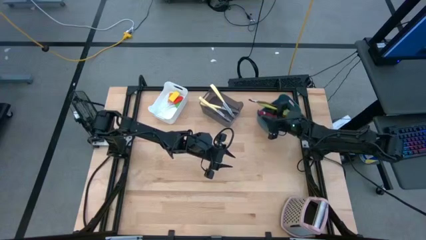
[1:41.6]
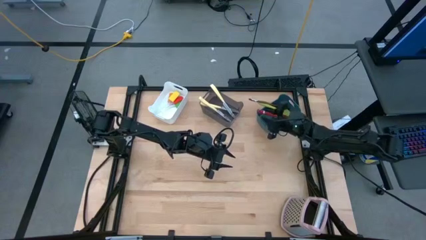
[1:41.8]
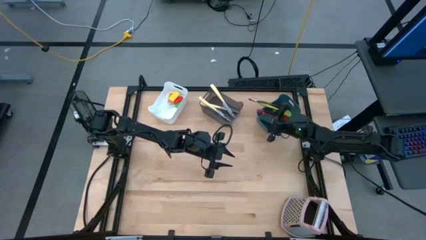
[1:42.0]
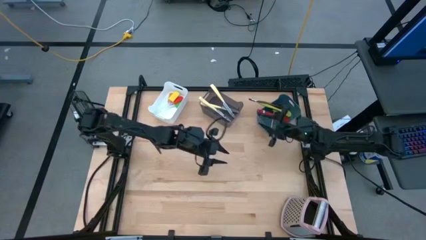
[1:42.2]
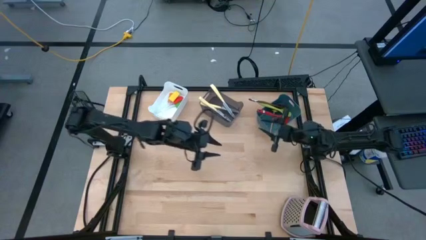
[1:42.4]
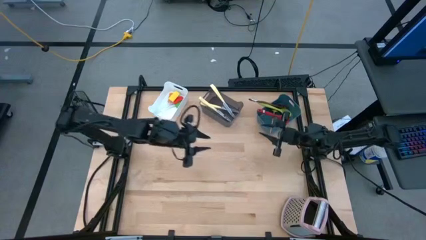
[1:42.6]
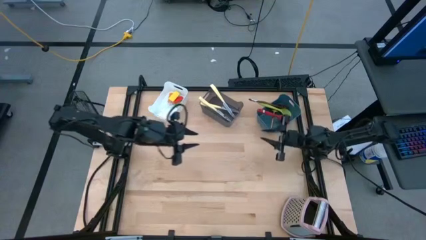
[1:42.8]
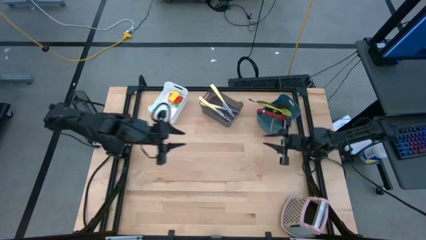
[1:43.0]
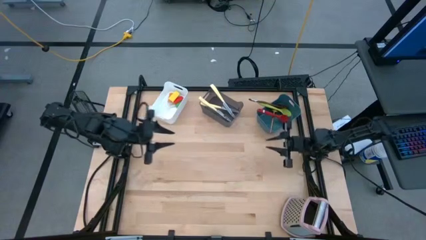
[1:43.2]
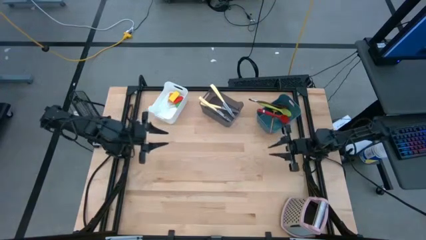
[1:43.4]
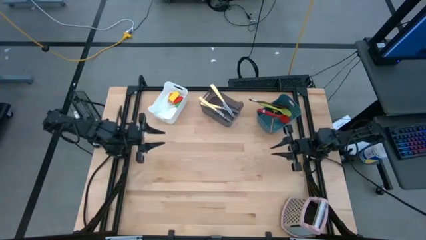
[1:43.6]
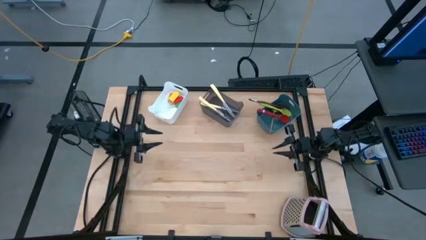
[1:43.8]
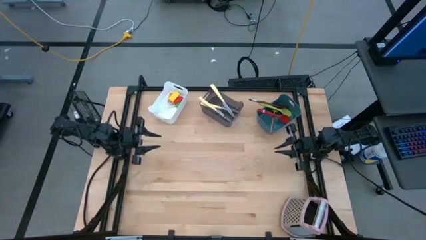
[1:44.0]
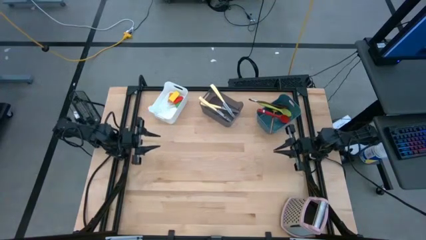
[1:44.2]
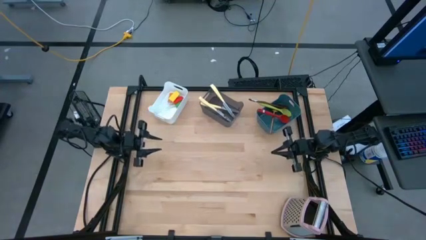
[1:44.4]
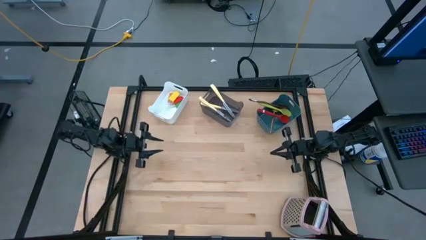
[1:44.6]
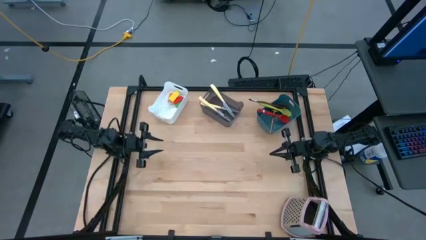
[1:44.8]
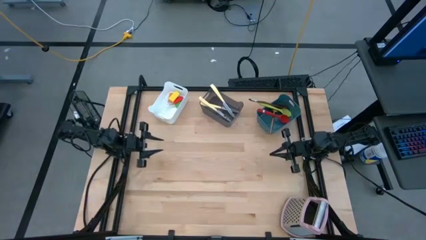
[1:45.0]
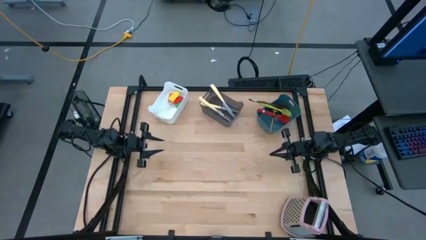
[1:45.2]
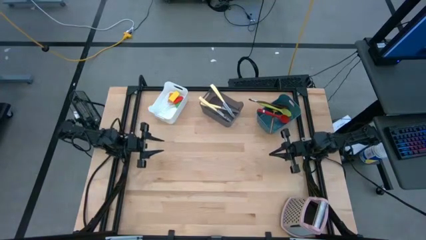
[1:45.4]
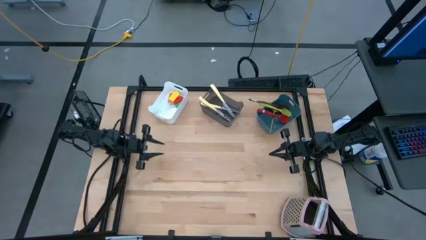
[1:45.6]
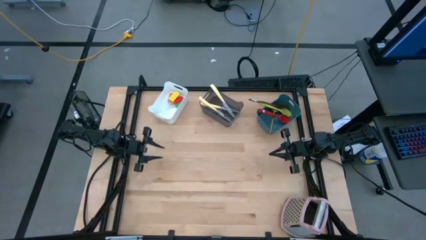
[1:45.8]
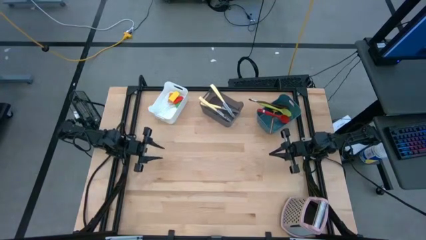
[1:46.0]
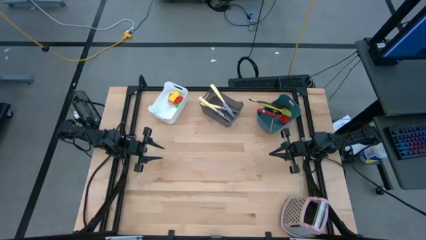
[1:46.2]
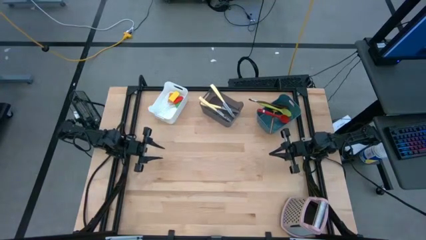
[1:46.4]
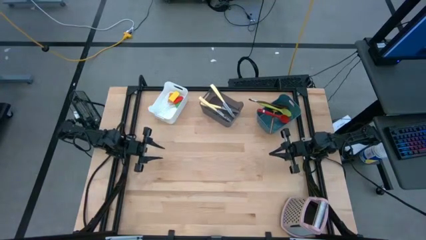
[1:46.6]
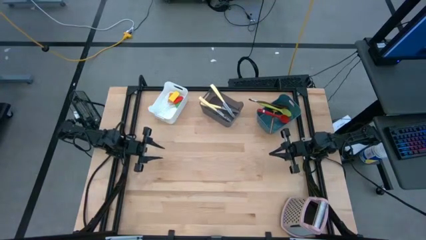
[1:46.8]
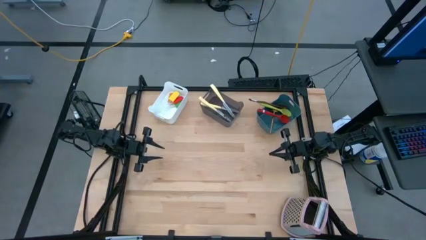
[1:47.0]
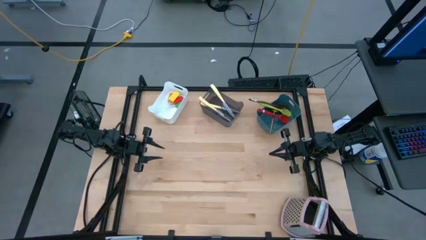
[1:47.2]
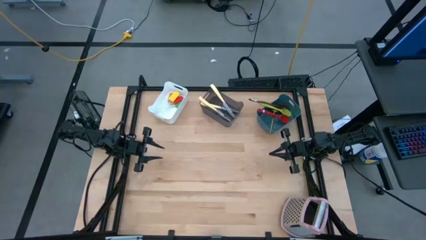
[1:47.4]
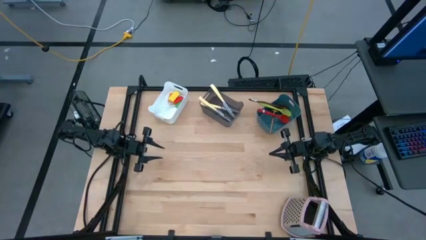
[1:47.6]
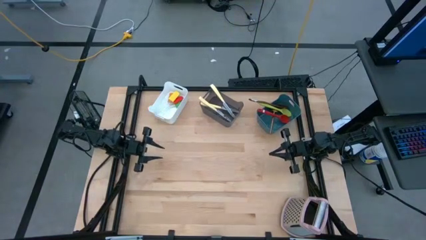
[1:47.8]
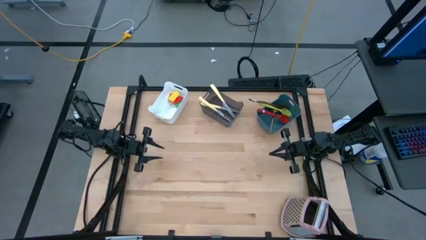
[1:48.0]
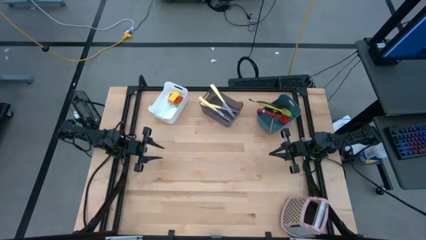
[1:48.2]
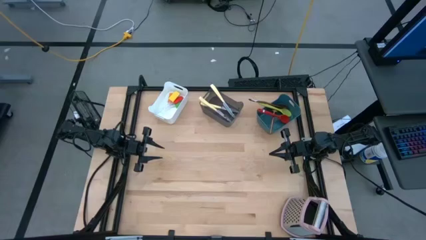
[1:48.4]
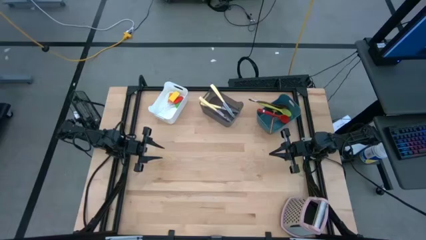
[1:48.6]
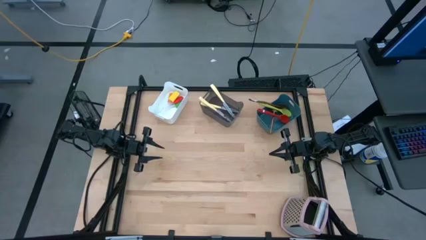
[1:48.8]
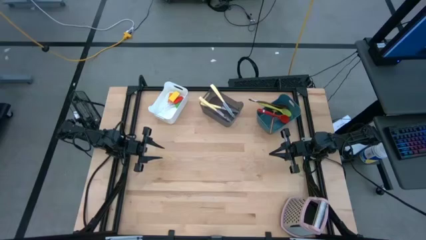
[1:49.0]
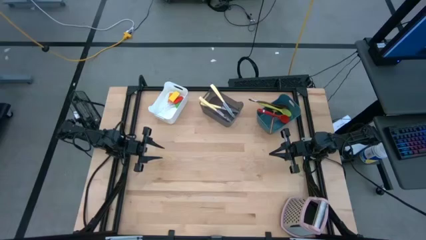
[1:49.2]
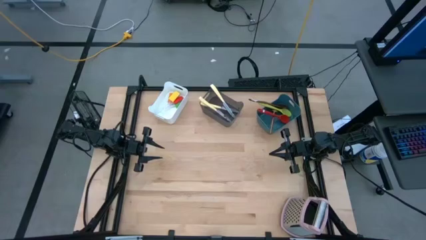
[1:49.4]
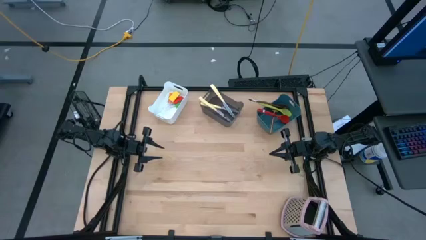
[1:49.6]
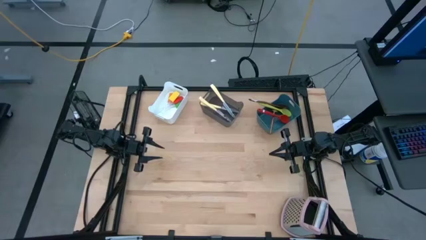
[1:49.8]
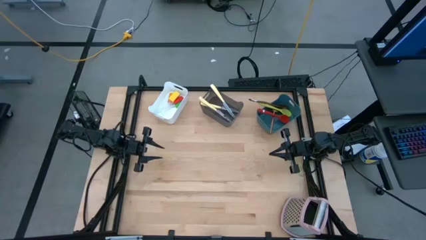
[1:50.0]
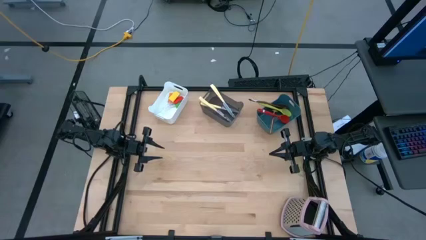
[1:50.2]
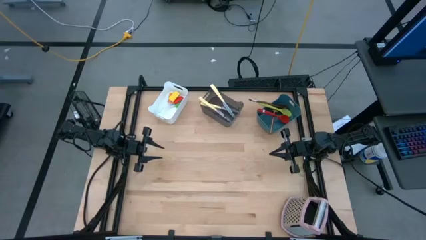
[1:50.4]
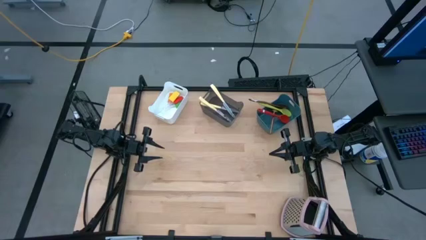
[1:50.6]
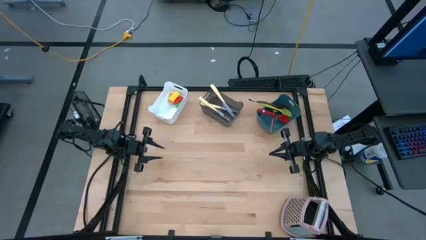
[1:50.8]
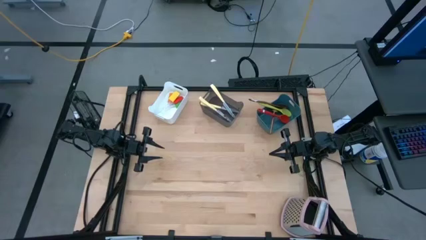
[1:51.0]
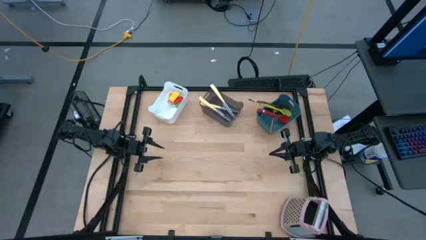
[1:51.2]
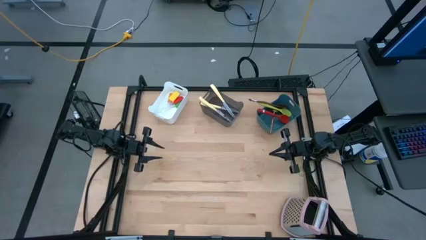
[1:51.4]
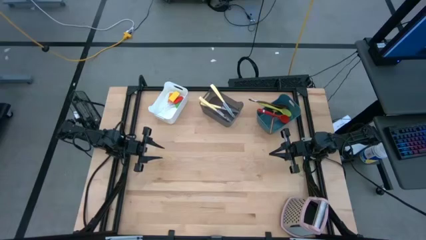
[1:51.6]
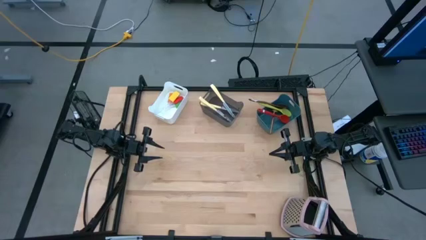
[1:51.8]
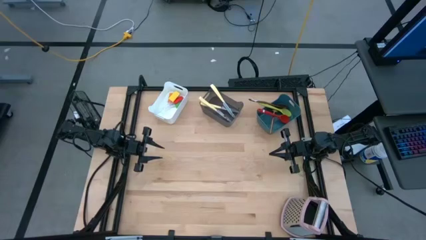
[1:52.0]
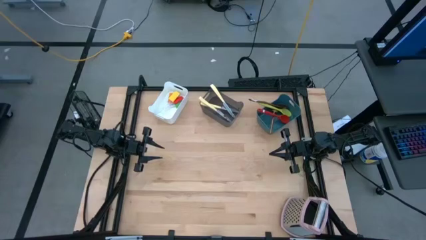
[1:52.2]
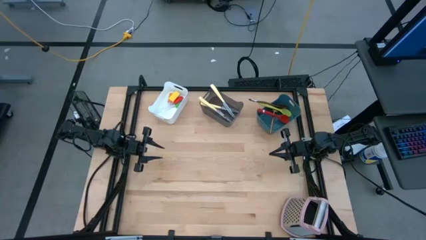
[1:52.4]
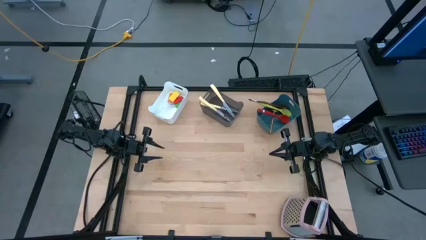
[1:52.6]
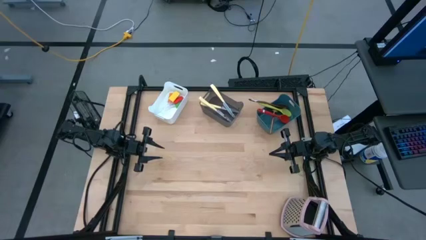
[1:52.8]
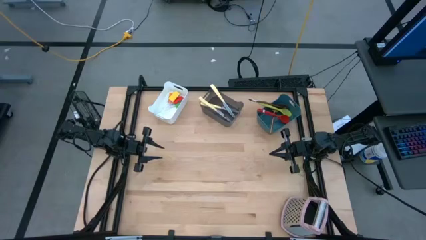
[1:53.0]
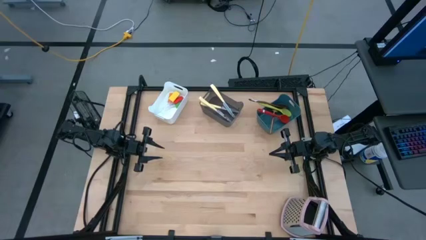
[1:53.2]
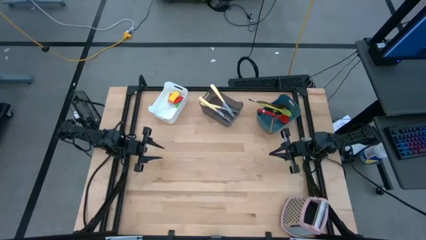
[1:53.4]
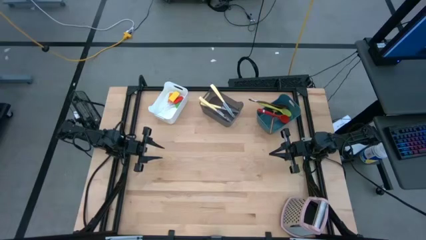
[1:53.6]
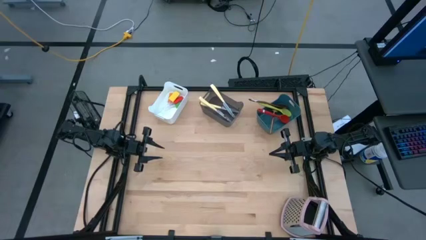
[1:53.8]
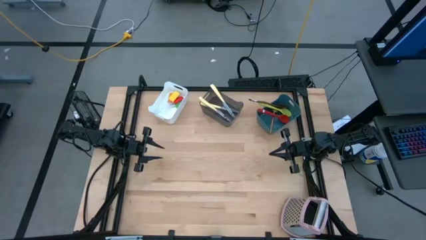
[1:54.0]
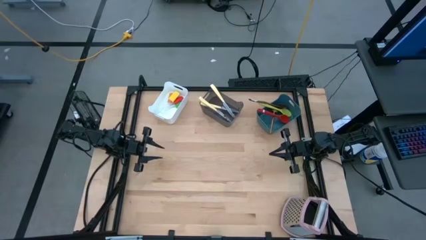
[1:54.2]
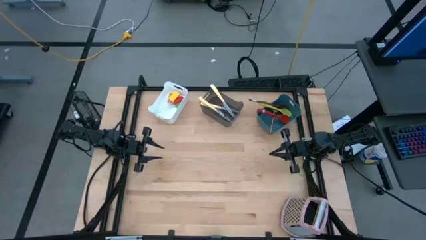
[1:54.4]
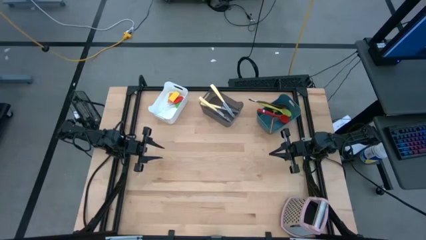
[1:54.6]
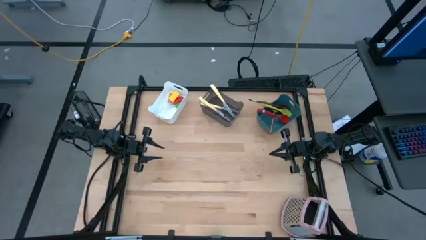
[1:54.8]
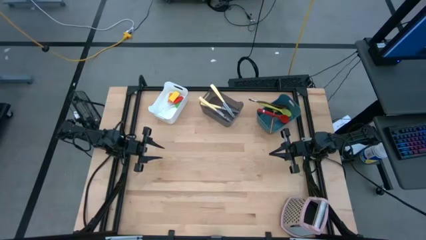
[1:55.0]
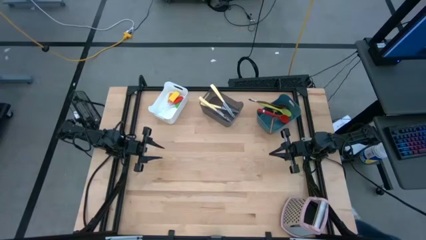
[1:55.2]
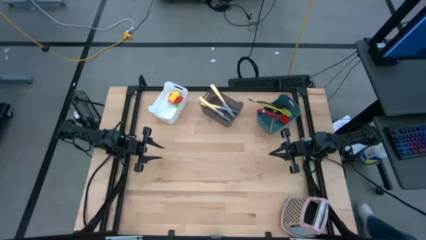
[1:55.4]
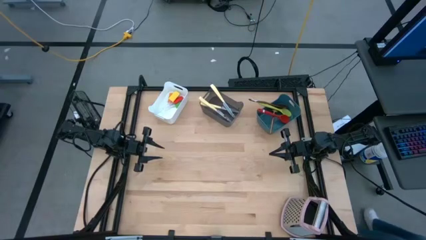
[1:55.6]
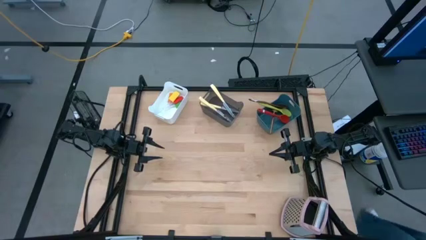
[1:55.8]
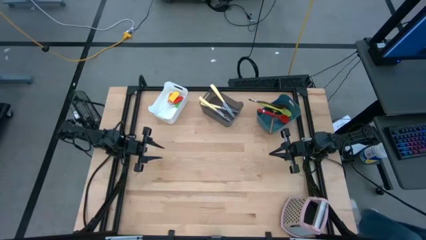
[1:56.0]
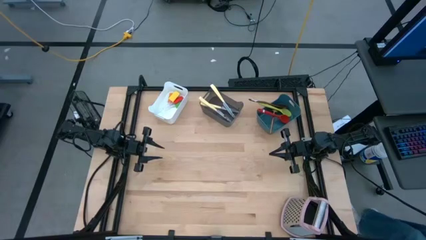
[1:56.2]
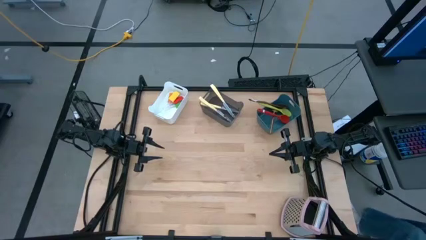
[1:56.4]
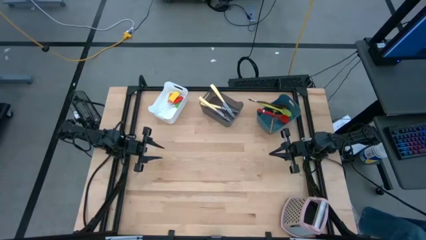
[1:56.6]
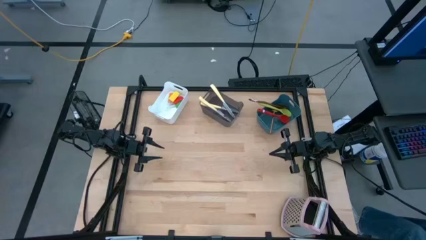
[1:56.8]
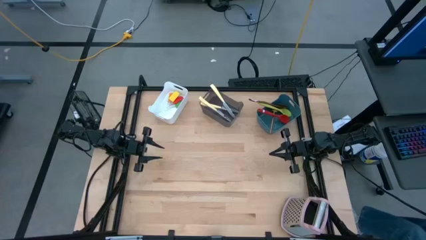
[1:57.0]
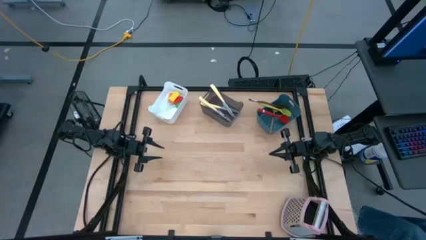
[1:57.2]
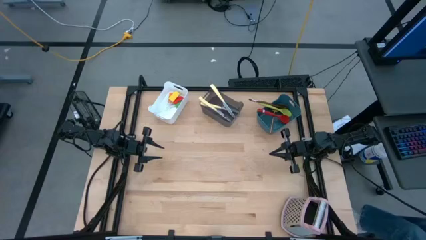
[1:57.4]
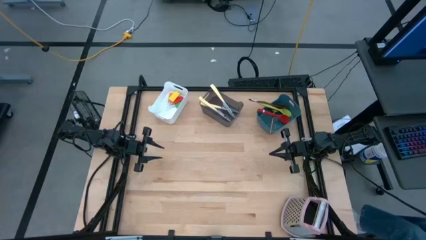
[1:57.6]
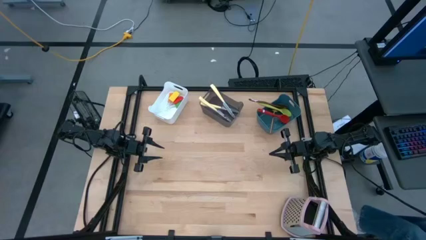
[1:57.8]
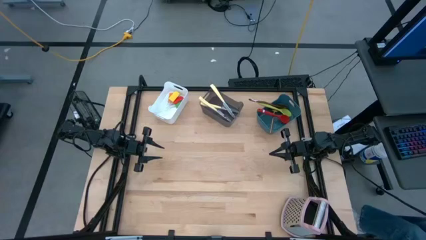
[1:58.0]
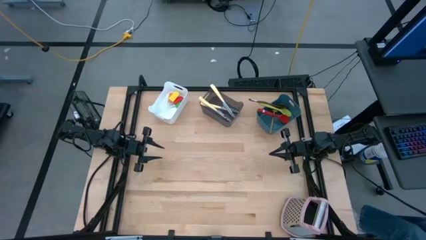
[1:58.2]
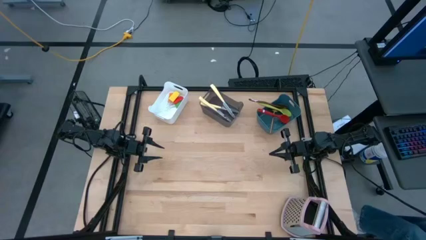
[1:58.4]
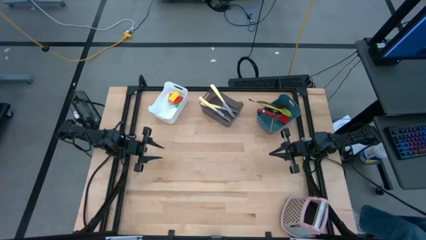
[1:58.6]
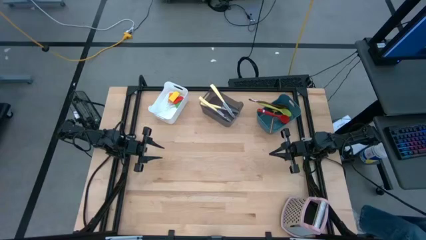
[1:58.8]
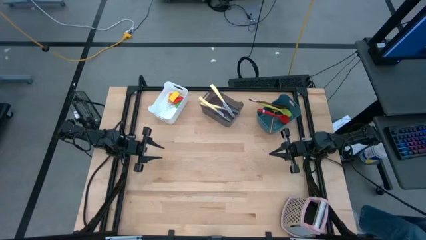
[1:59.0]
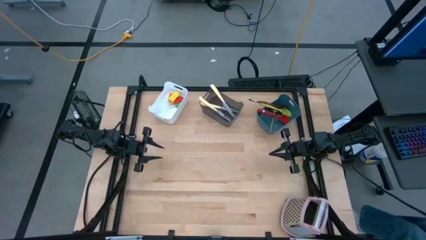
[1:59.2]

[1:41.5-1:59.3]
Task: Pick & Place Kitchen Items
Return to Home Position
